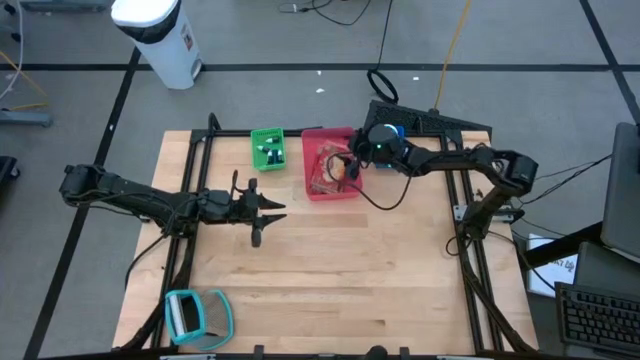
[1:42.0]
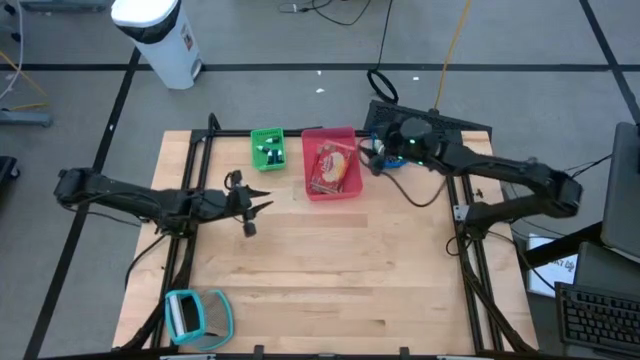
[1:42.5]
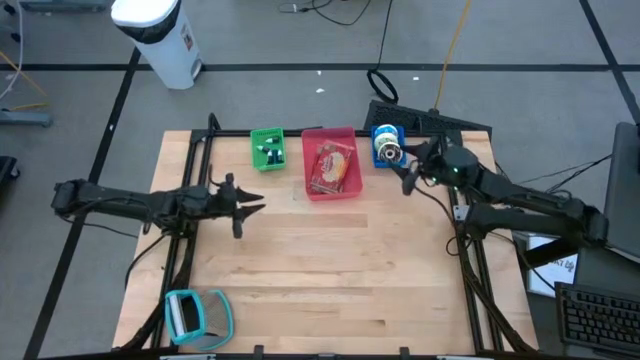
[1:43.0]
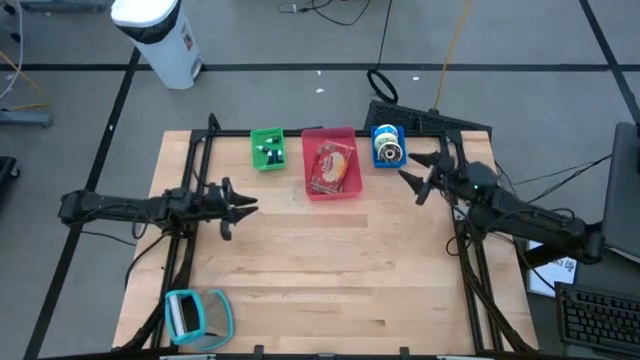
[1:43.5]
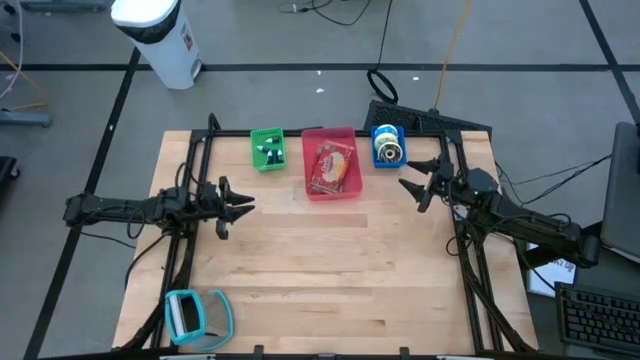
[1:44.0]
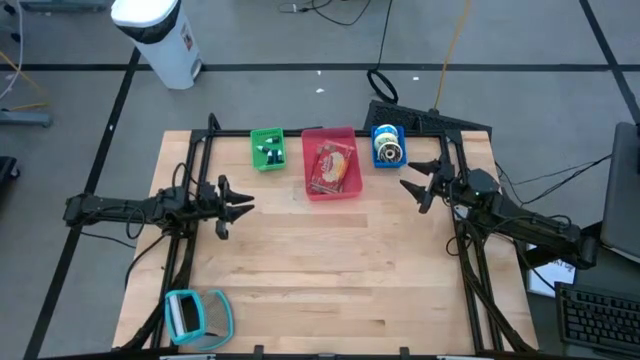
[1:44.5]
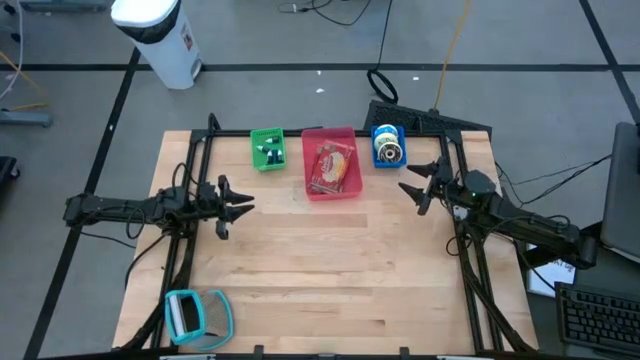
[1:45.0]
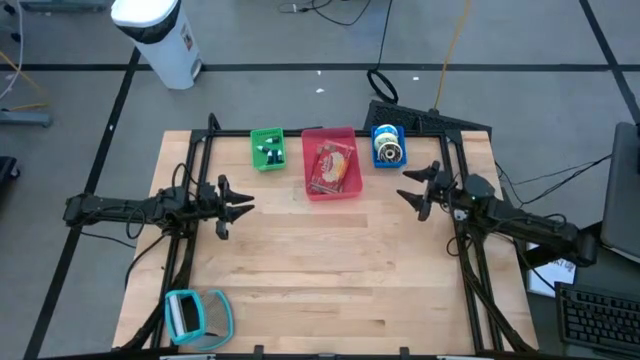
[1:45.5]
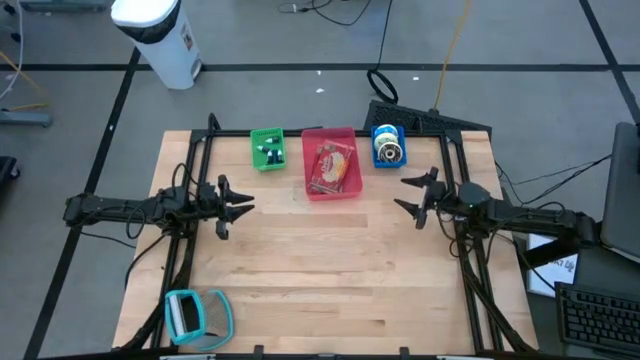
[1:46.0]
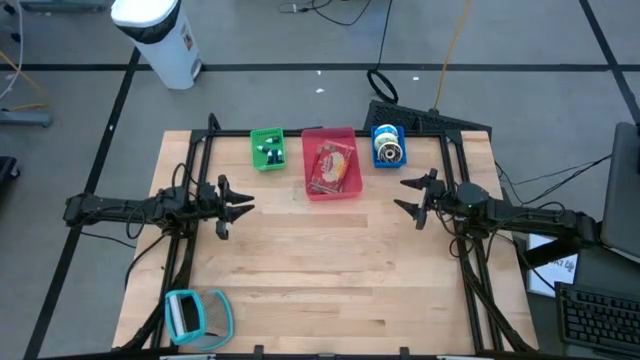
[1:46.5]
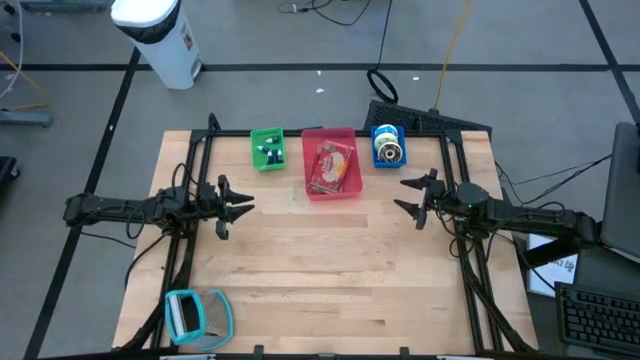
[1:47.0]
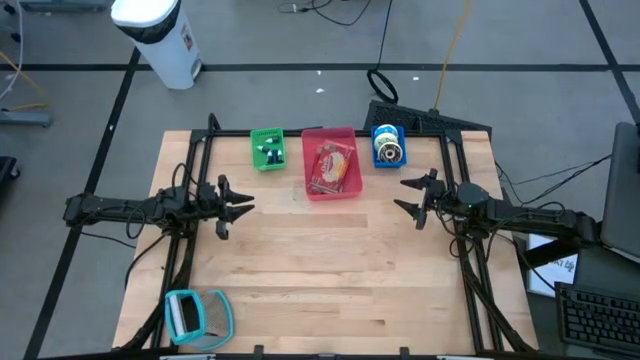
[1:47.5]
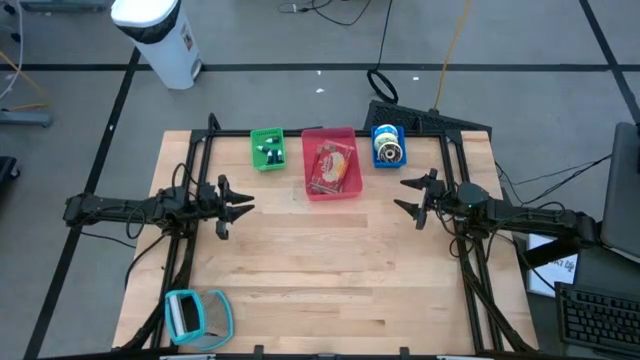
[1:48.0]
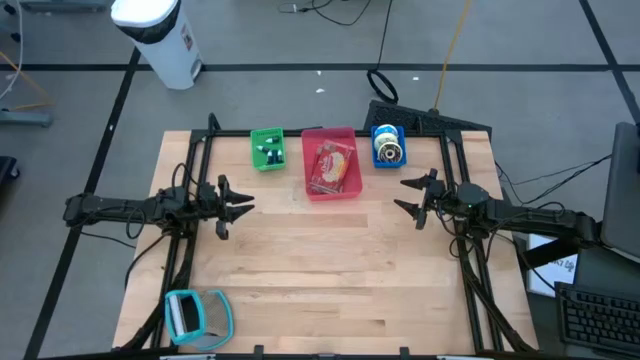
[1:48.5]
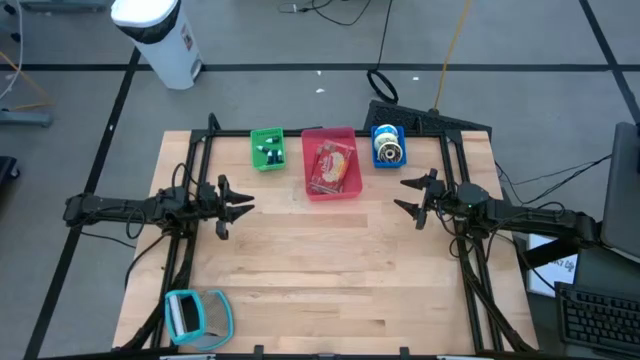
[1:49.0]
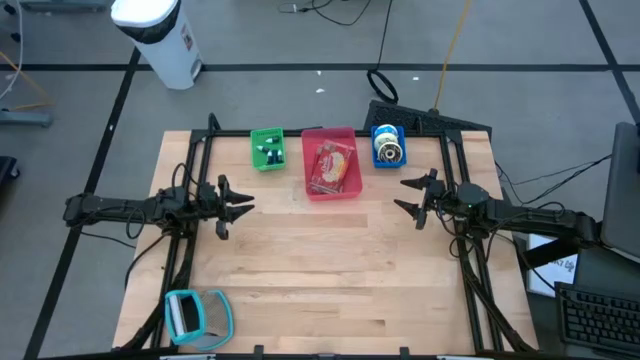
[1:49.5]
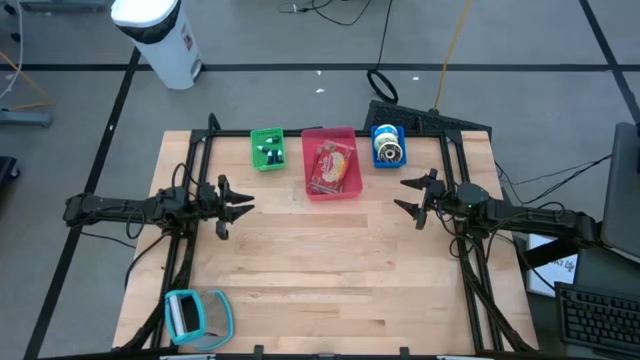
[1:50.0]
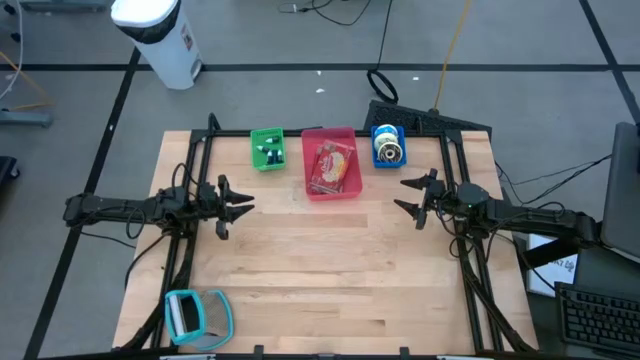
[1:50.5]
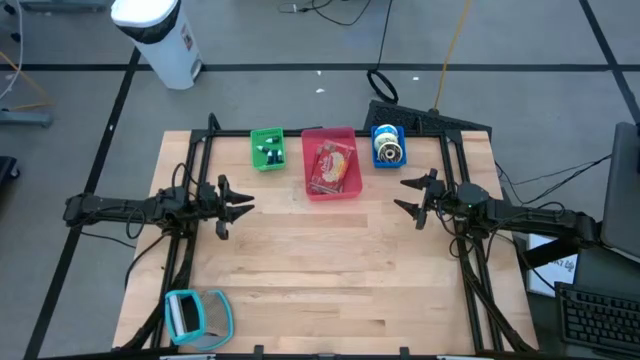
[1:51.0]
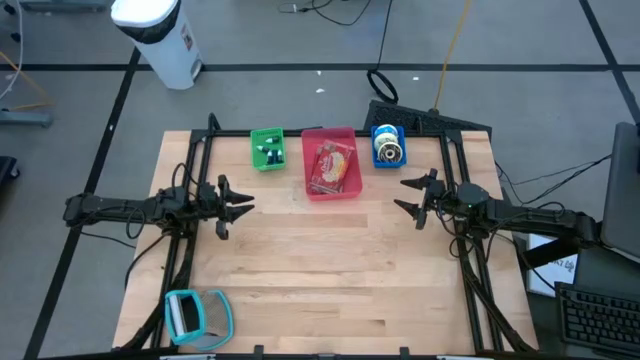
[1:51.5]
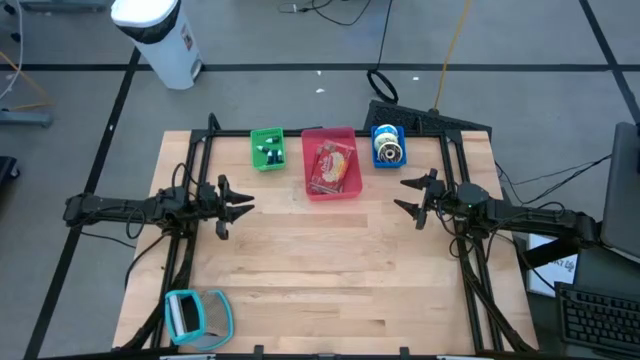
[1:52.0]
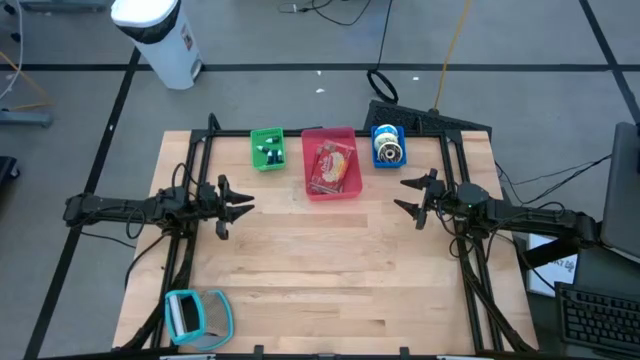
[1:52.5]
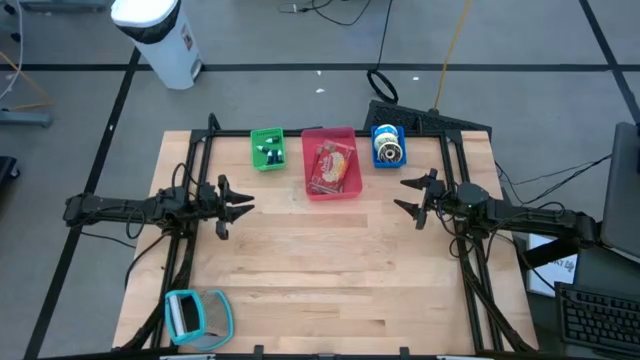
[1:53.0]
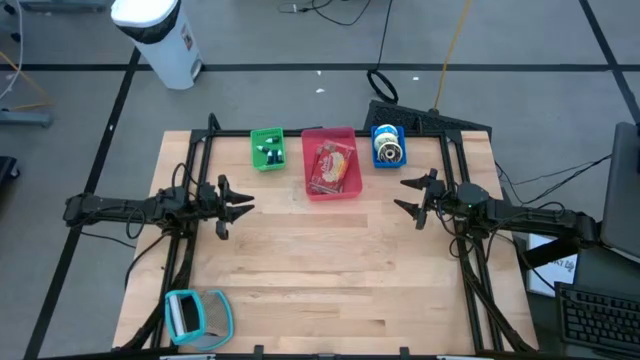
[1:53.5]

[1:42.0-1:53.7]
Return to Home Position
